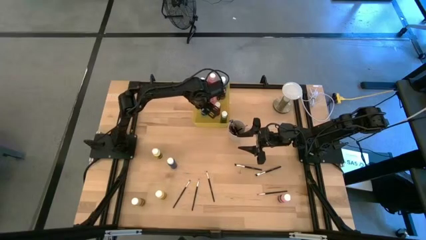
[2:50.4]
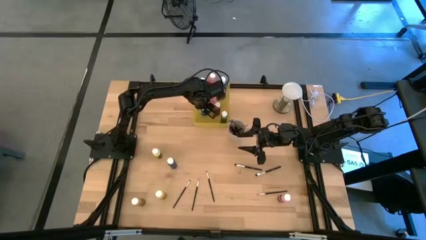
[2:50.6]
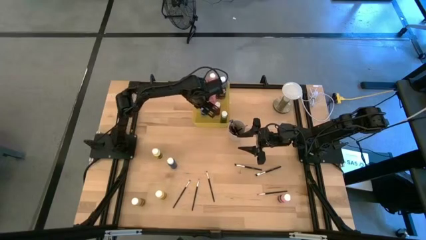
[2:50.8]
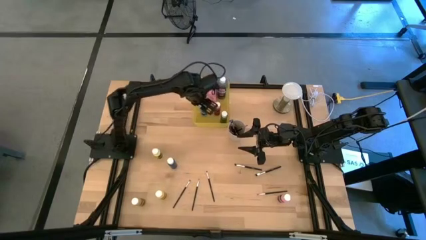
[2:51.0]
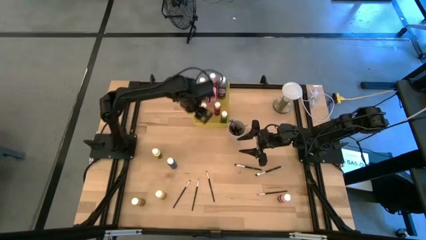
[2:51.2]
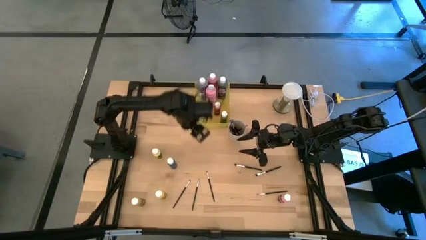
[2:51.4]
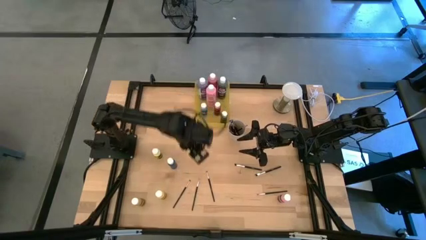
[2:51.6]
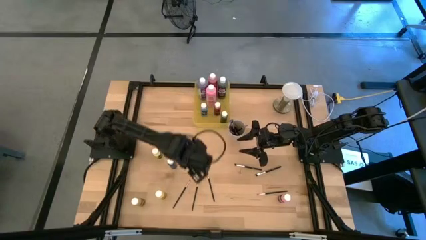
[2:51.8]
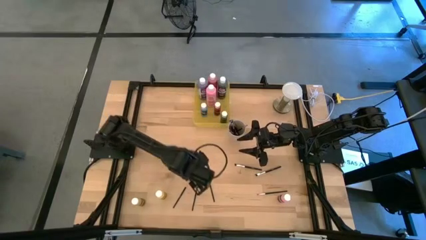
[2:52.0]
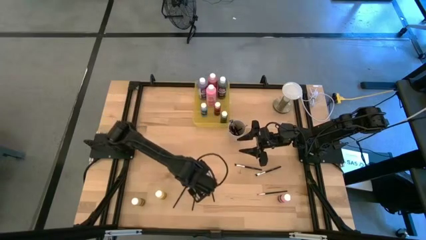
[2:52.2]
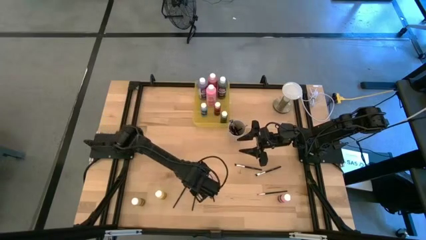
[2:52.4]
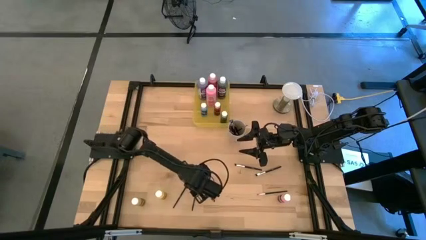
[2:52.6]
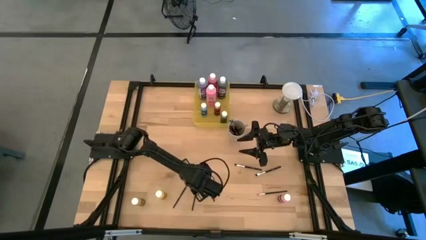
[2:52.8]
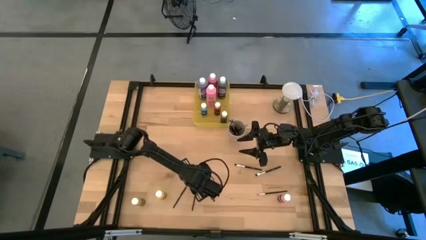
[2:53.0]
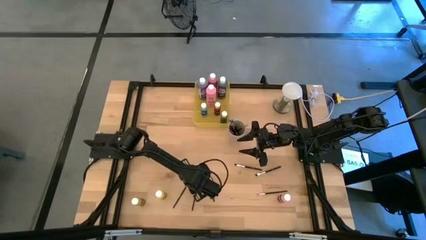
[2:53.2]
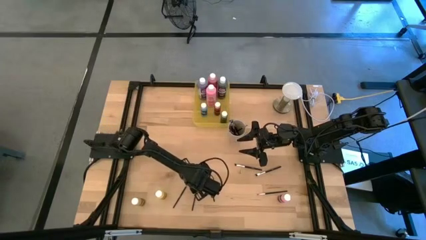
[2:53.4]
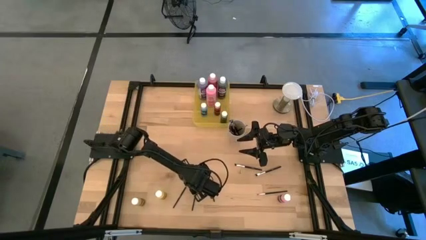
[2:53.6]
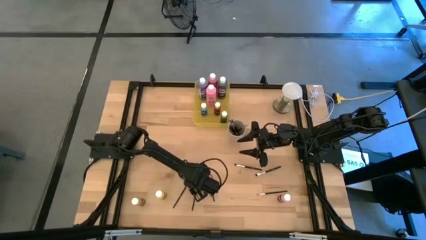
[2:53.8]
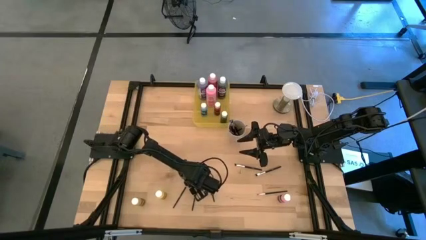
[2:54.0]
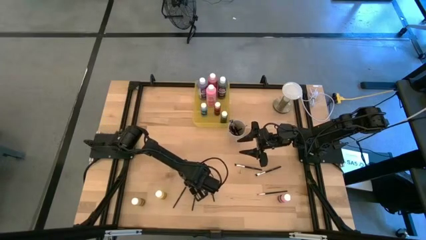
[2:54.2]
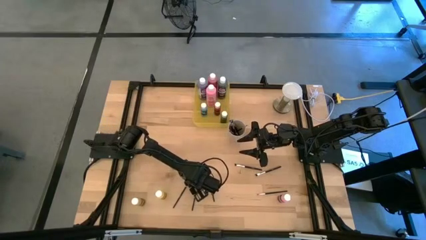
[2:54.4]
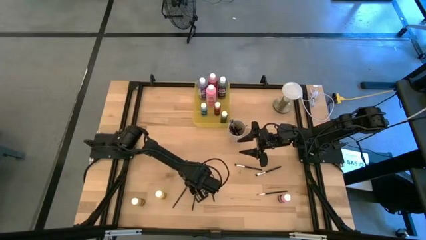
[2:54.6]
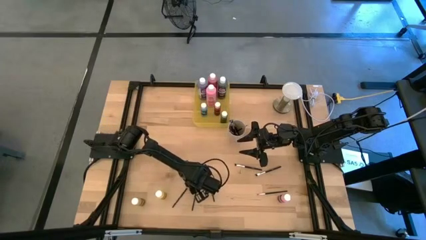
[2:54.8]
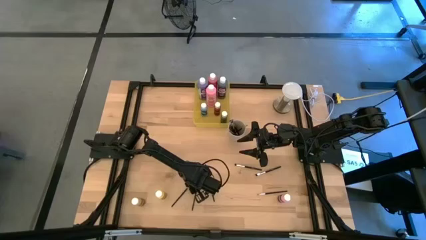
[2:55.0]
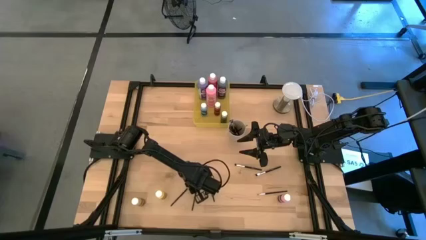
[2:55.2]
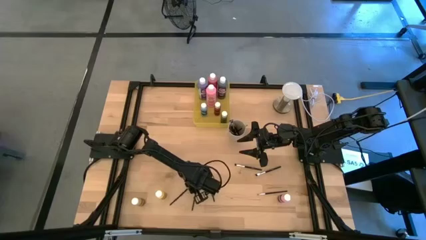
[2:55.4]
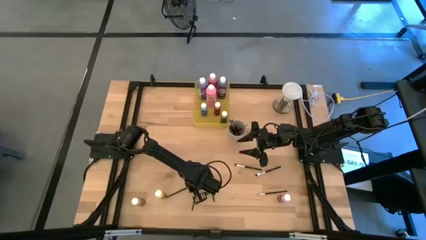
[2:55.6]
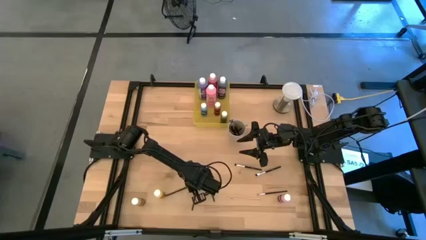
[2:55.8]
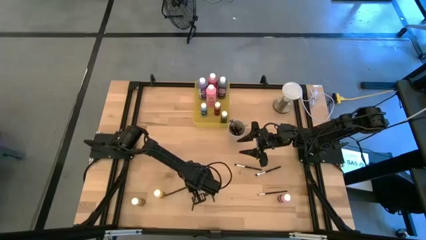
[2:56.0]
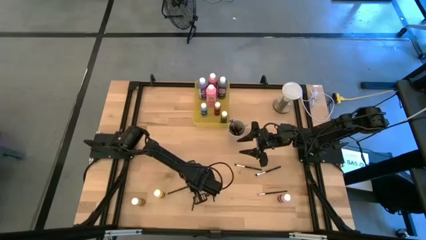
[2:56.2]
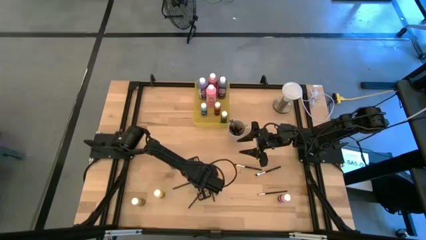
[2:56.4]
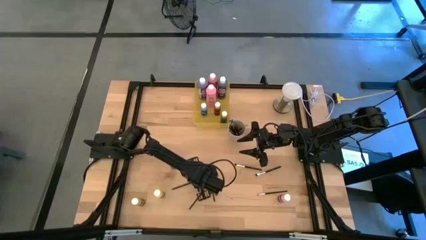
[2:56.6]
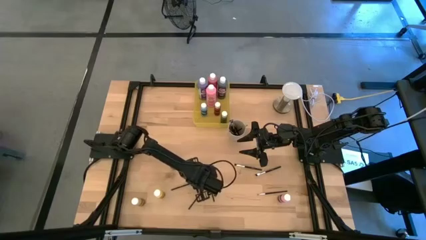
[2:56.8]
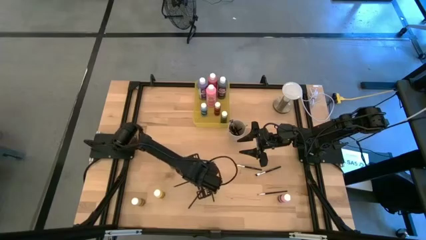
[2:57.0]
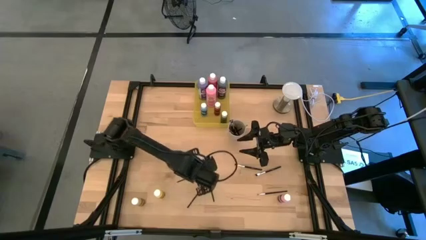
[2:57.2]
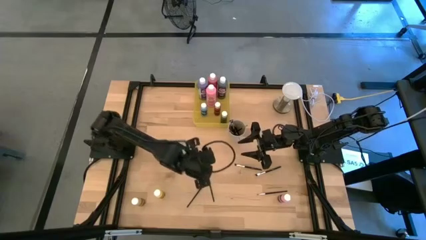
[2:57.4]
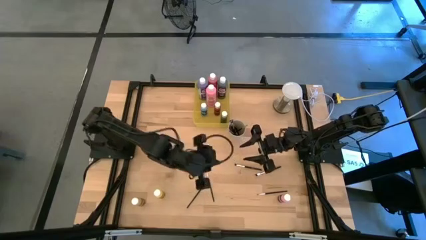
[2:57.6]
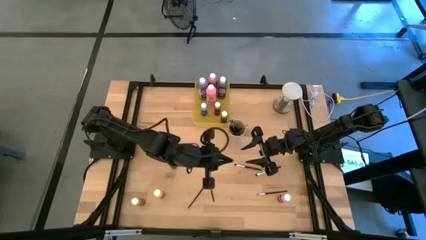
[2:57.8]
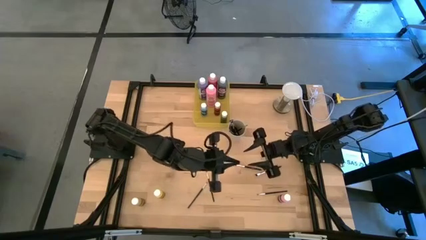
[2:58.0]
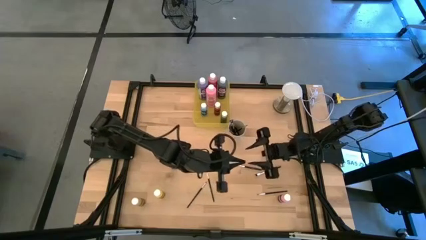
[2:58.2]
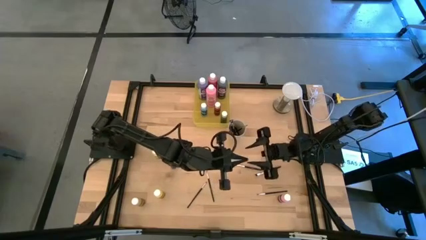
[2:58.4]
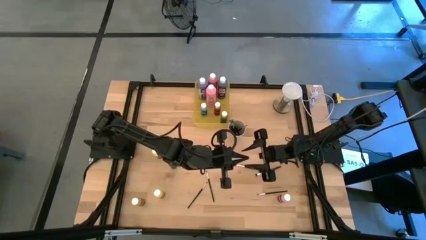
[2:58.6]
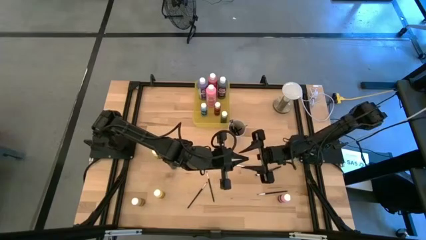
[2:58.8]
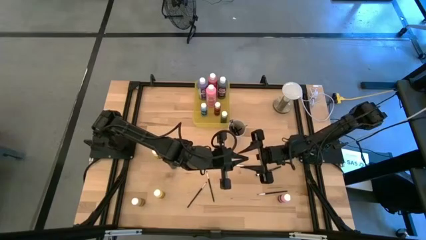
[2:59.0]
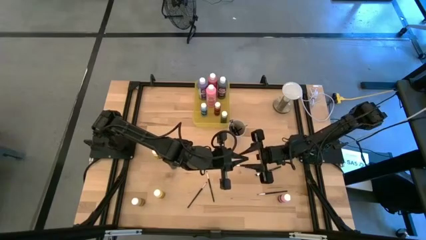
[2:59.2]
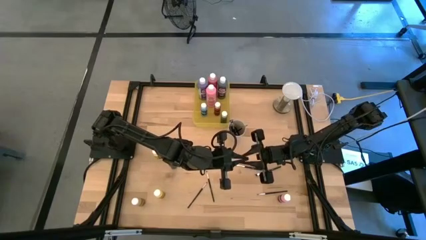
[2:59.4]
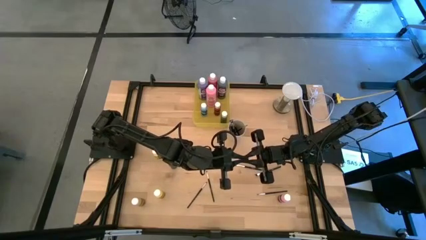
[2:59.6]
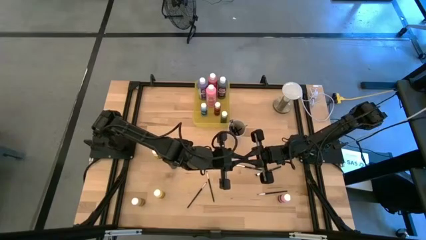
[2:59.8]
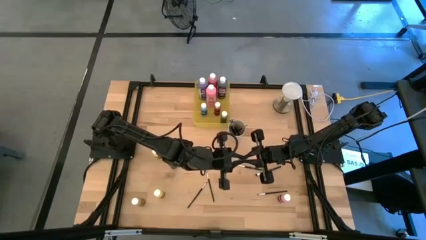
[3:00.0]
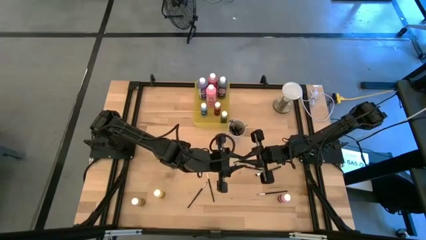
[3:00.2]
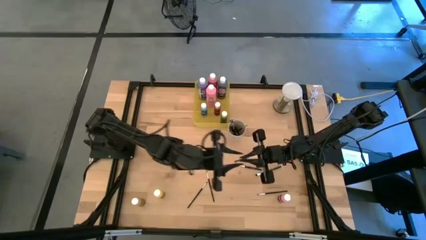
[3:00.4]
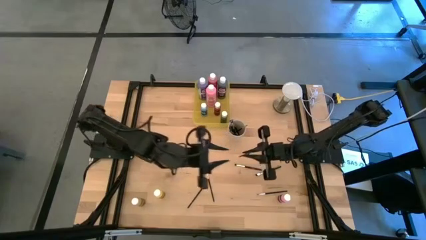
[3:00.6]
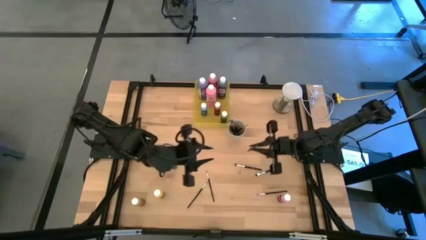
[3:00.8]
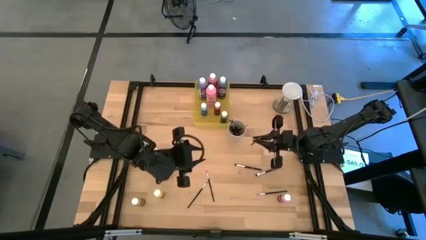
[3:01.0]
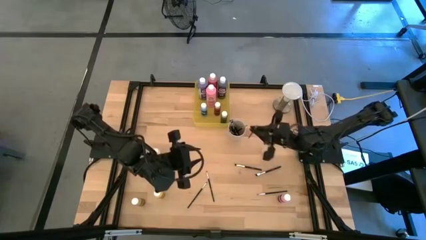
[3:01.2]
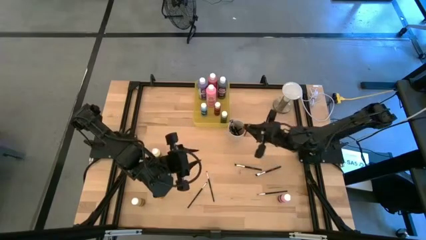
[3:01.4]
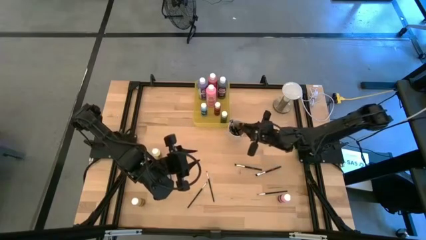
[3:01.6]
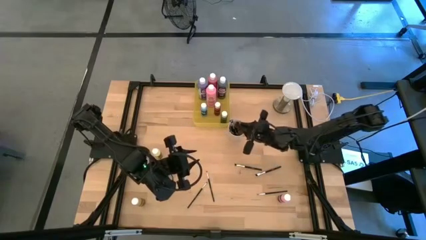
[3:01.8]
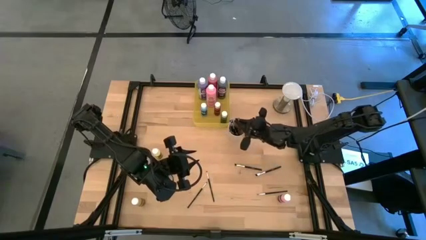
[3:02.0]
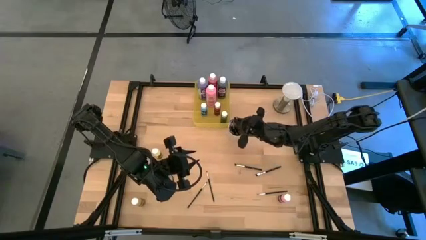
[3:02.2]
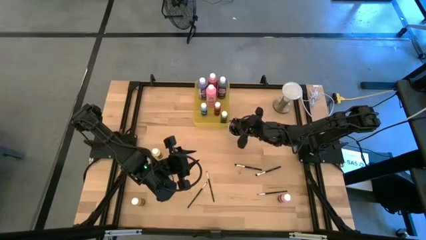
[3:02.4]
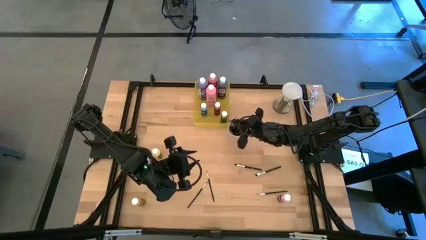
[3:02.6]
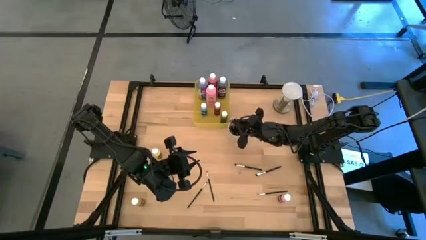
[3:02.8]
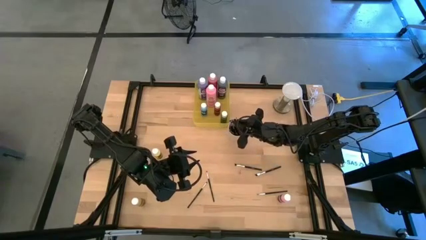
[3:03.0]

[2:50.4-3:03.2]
Task: Pick & Place Paint Supplies
Put the balck paintbrush into the white cup

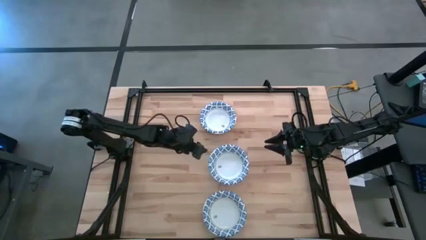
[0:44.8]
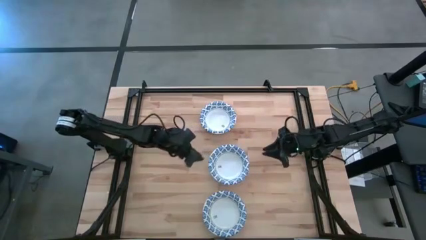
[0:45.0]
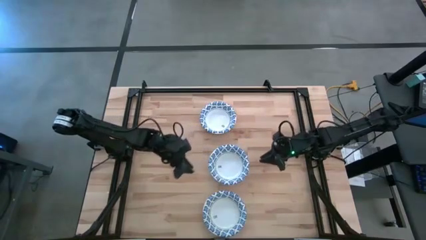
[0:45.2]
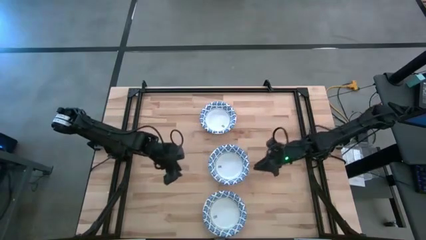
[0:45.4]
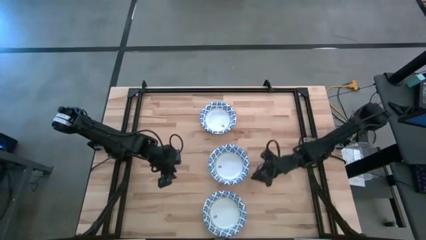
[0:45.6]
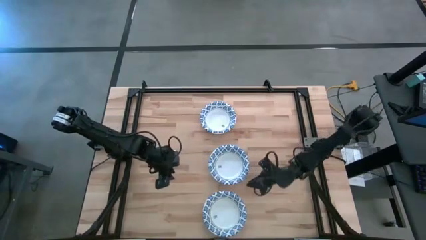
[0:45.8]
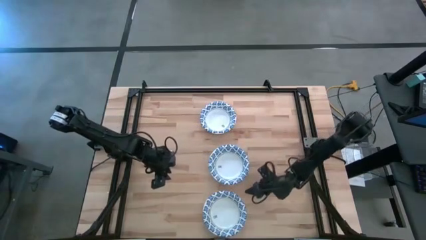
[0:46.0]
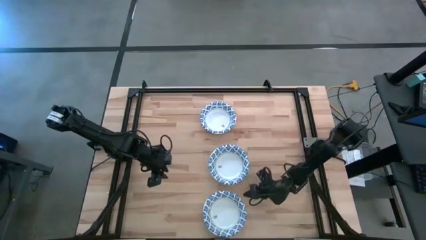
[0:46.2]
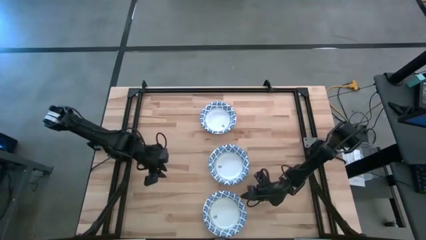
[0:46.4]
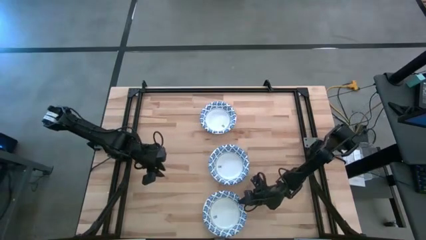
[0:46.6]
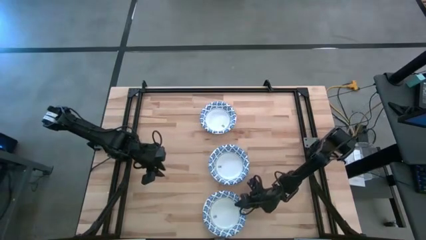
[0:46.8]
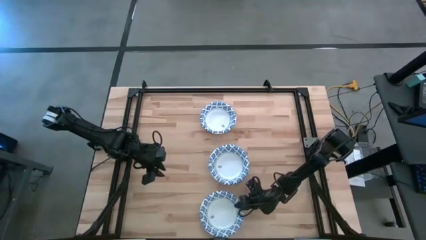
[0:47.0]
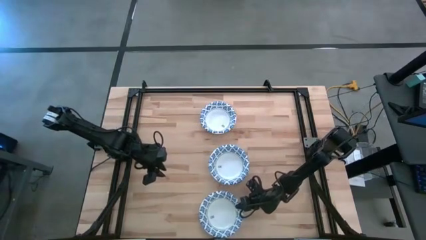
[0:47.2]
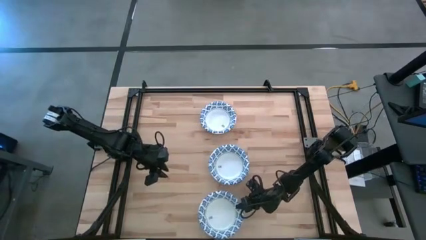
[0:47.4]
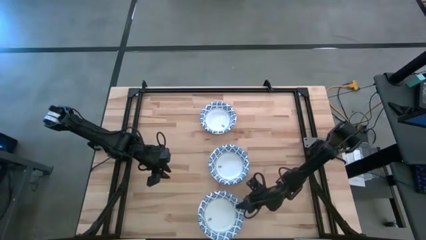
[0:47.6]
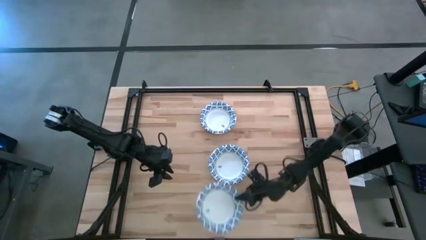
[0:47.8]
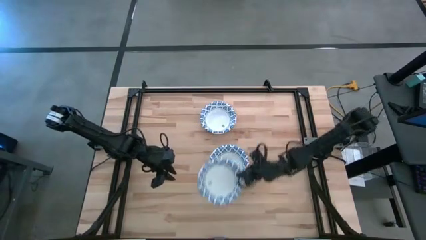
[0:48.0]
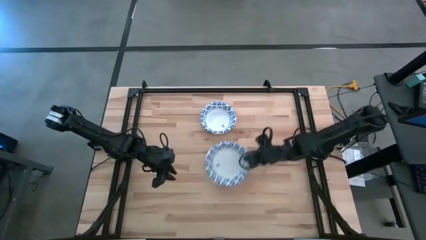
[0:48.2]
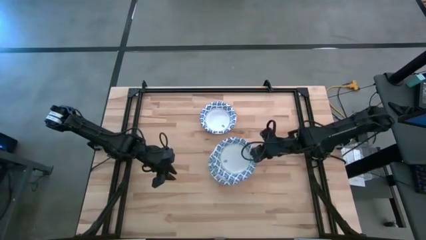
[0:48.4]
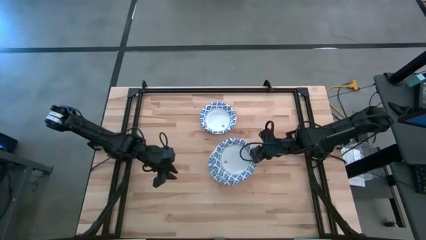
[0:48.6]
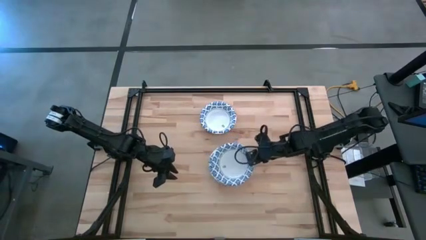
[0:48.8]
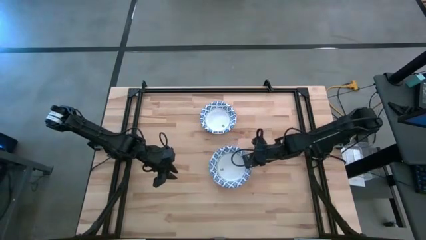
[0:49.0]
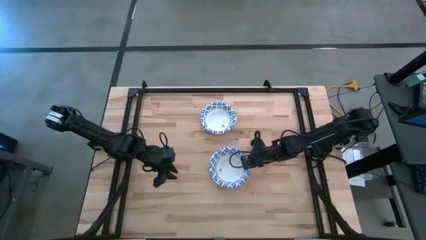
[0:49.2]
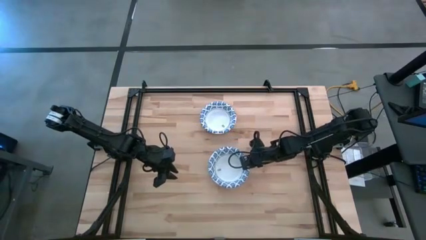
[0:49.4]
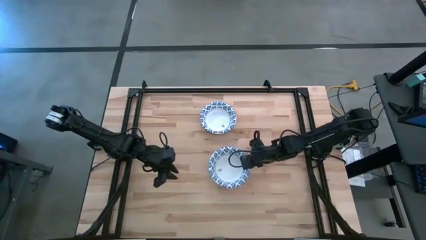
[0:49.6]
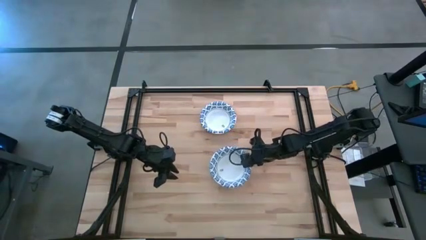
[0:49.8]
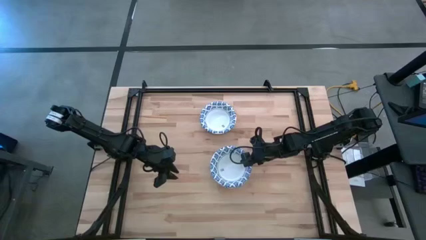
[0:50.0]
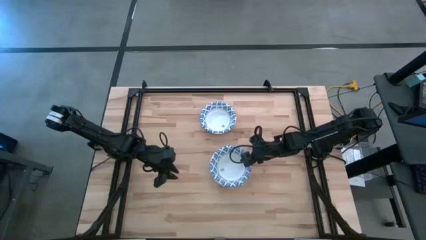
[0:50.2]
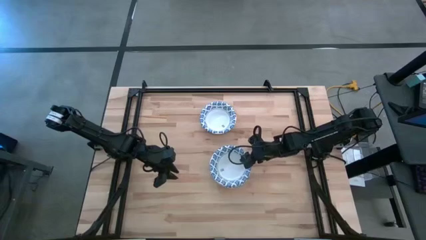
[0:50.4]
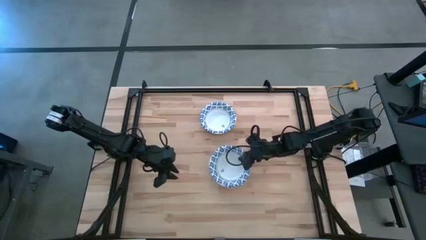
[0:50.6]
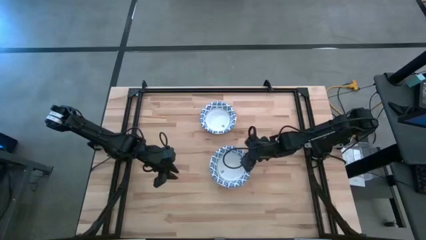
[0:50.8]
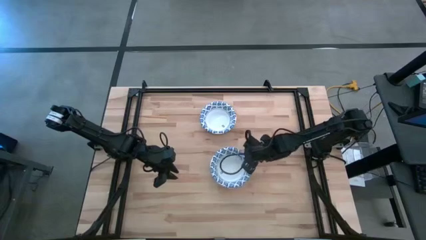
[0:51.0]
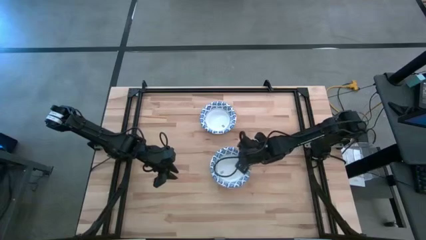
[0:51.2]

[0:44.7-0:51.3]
Task: Nest bowls inside each other
Stack the white patterned bowl on top of the other white patterned bowl
